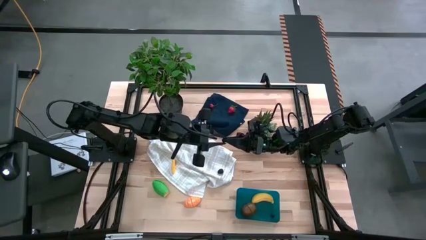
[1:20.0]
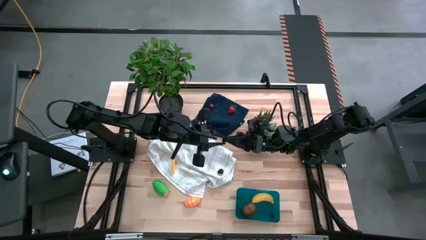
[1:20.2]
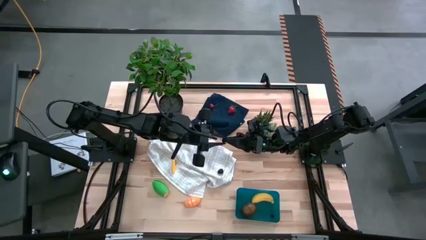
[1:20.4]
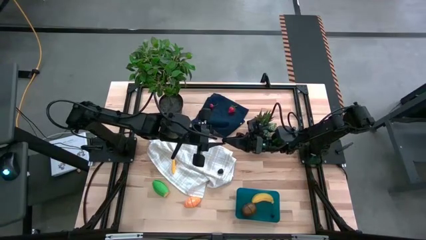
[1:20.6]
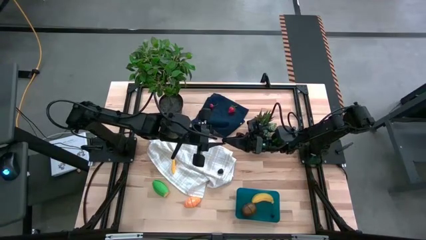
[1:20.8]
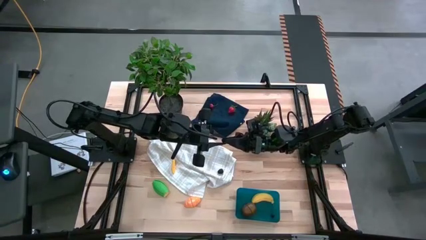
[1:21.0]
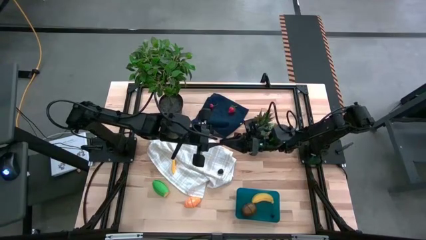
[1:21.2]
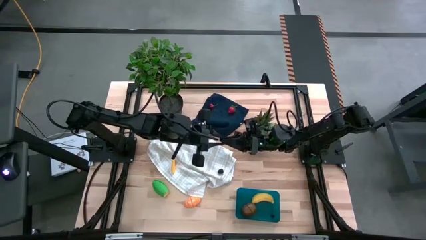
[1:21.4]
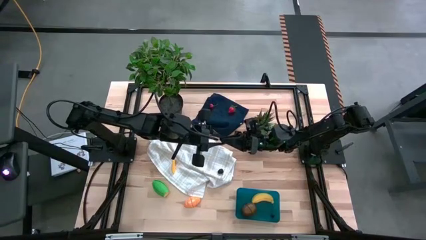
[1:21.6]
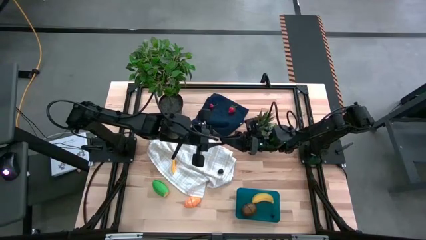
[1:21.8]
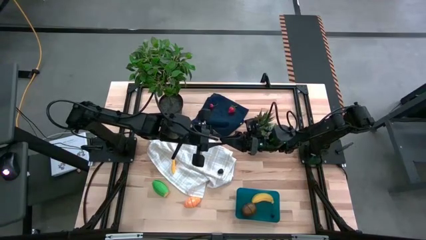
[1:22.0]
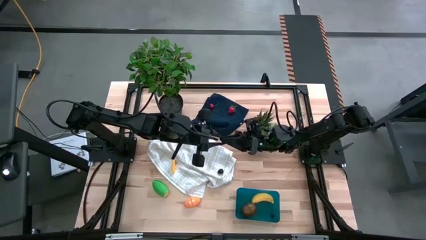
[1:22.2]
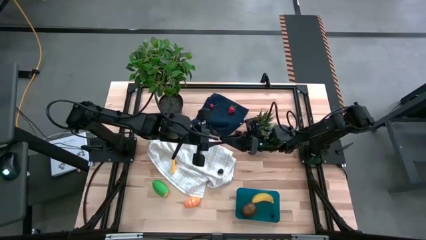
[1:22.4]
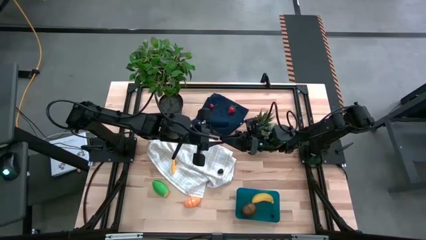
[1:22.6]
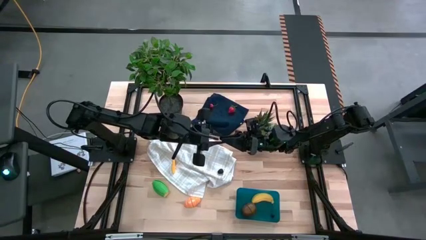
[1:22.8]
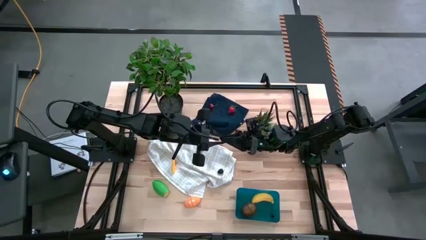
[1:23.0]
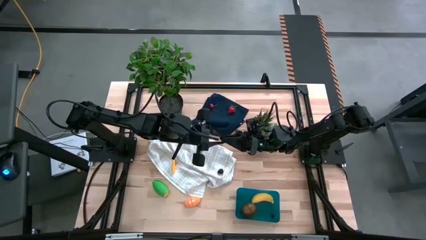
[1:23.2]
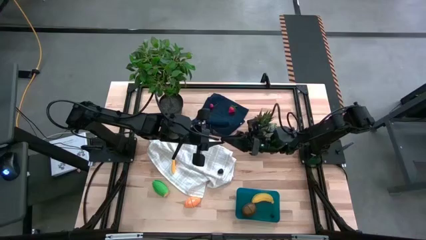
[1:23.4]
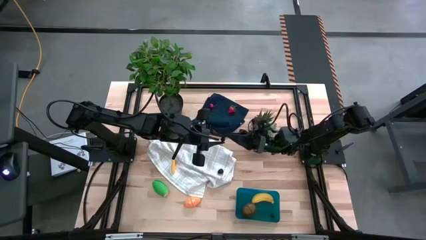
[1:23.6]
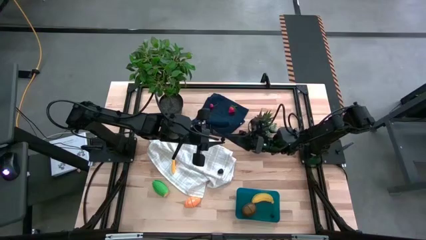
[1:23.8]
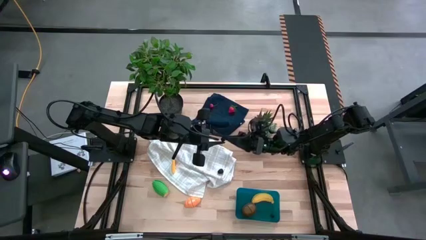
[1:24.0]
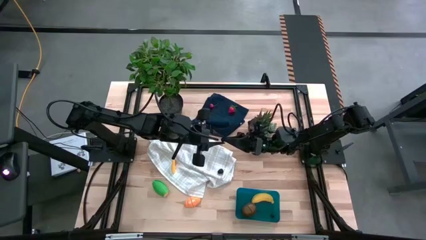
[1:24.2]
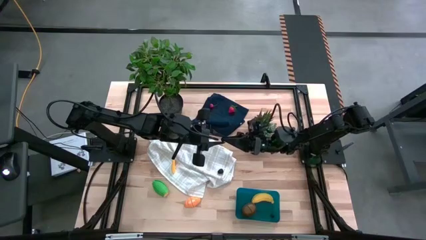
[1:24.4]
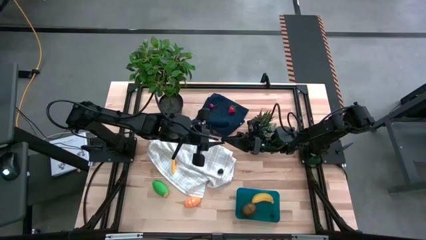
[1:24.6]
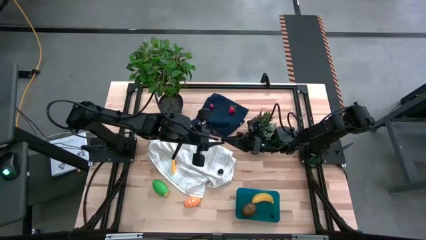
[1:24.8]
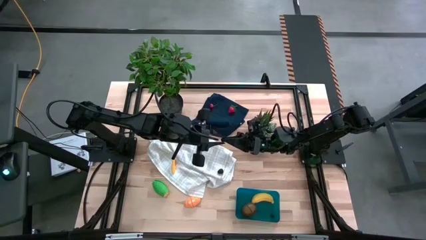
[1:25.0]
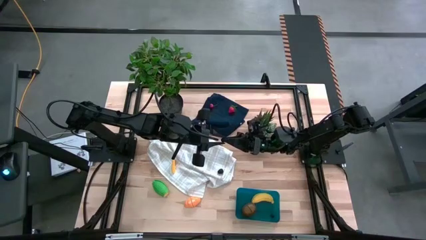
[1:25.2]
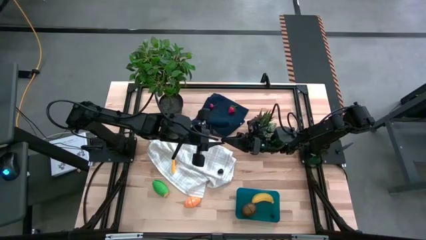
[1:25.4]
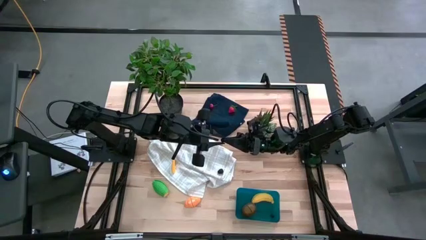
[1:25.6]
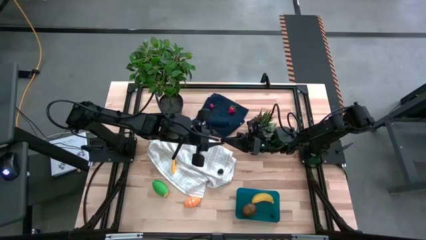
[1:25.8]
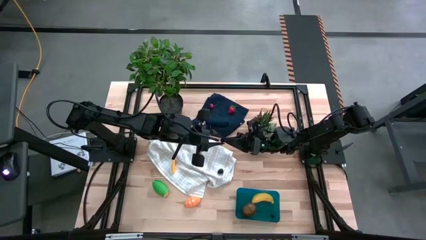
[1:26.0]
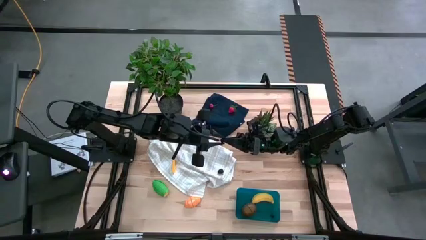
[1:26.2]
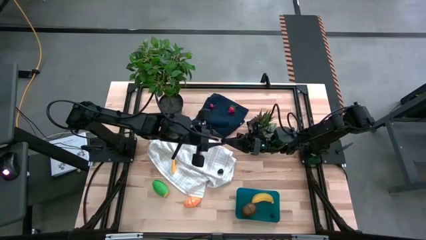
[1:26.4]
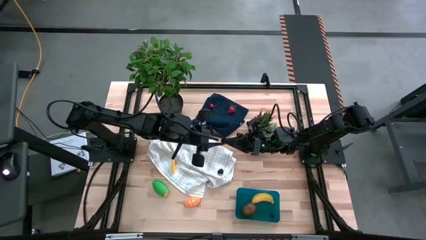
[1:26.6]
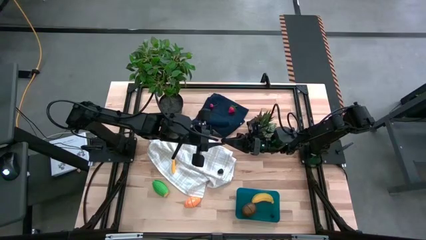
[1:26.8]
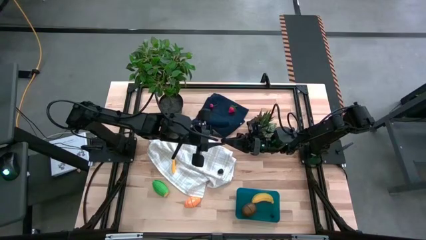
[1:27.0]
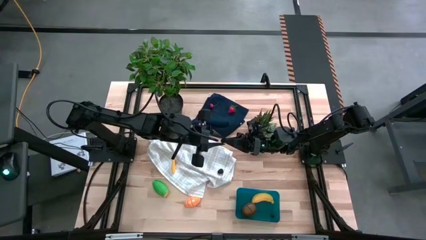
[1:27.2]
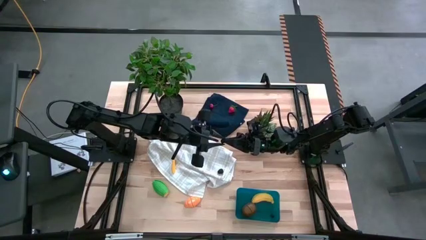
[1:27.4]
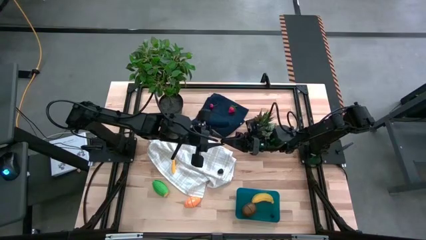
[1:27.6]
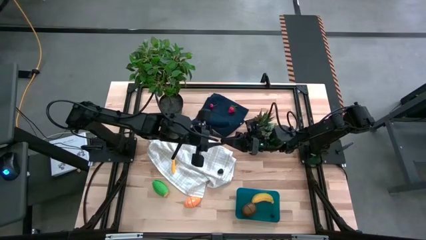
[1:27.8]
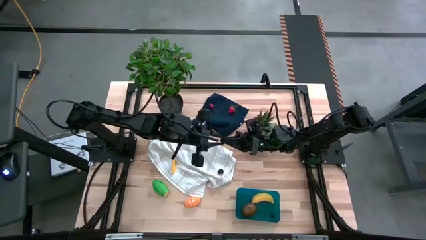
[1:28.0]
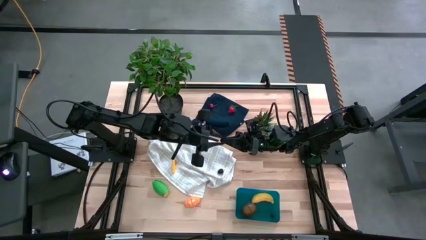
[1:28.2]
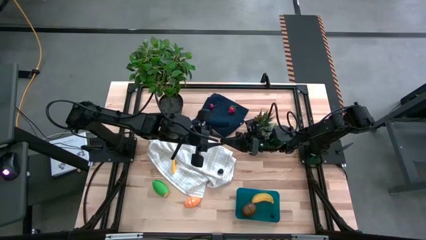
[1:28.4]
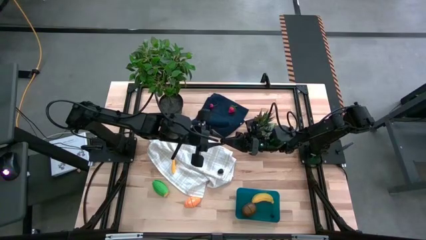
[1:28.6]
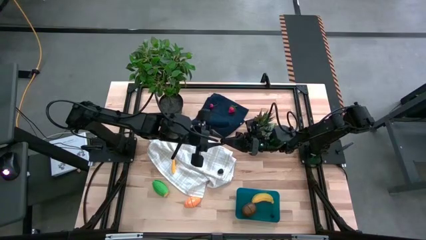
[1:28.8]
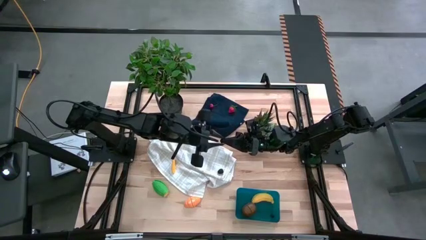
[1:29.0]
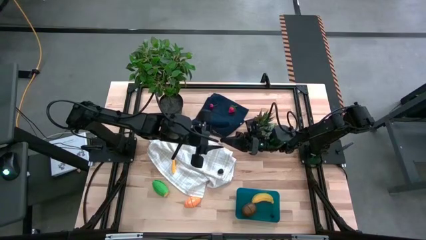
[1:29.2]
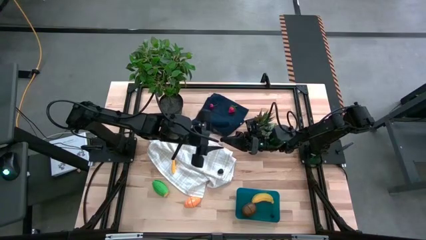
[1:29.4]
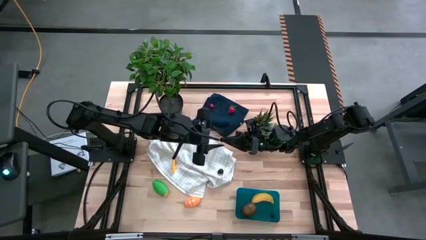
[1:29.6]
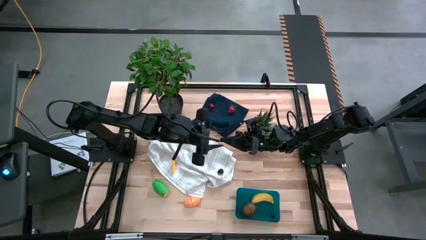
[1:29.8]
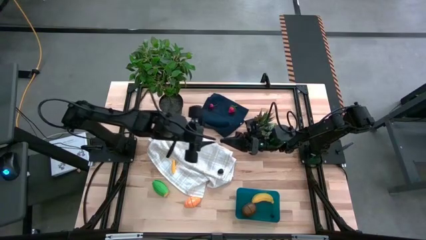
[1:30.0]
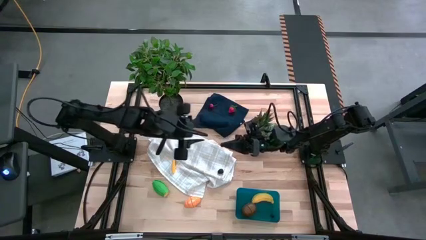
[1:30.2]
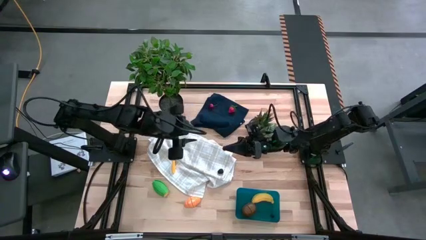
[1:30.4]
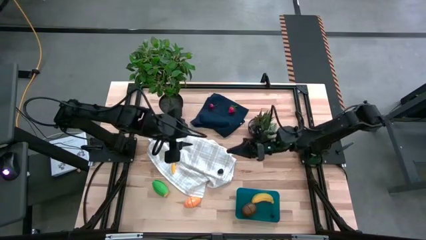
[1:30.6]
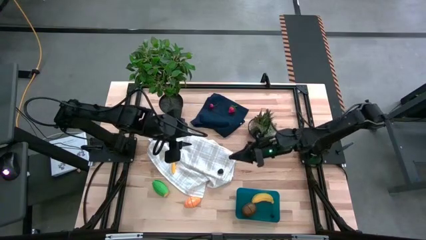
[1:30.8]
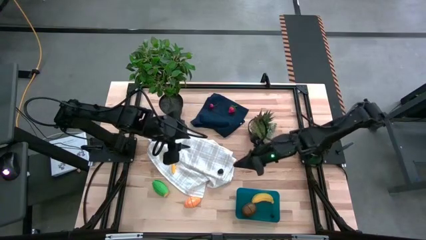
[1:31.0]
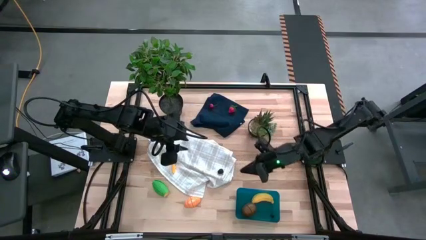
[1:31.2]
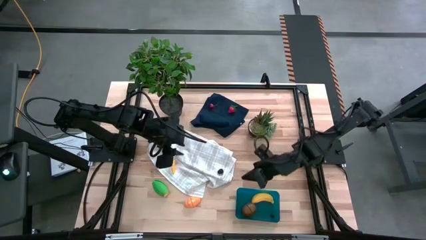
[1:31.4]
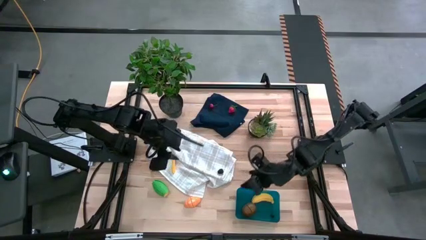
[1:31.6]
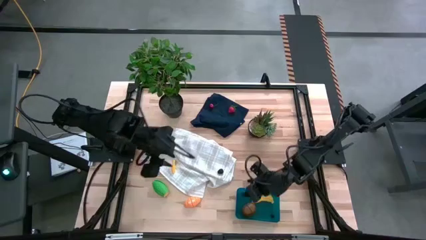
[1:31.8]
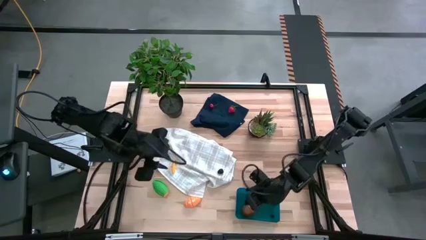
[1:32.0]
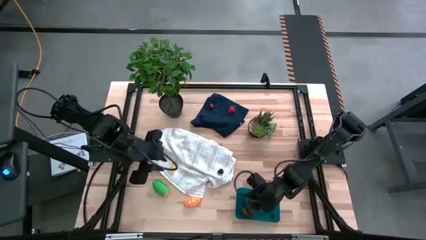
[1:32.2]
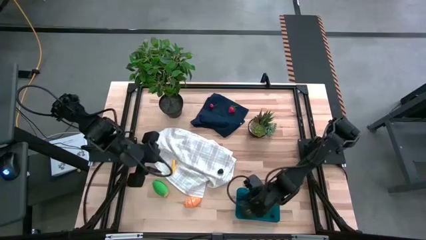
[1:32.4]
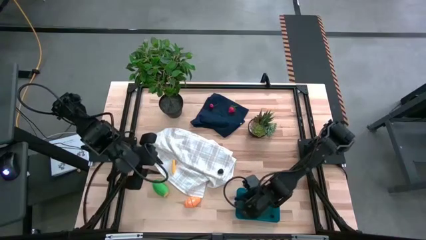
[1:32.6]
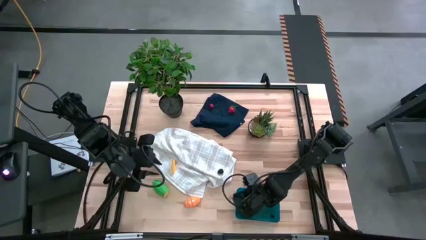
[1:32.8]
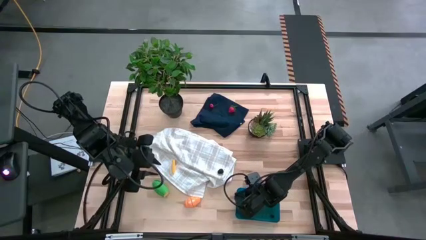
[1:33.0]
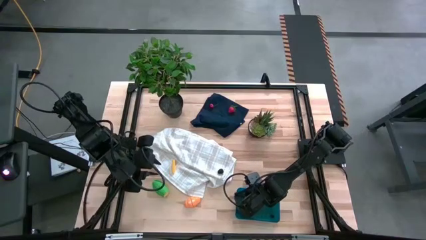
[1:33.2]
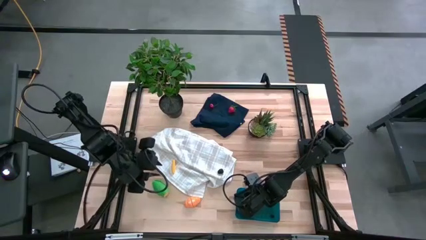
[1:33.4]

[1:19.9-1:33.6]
Task: Pick and placing Produce into tupperware
Put the blueberry into the bin

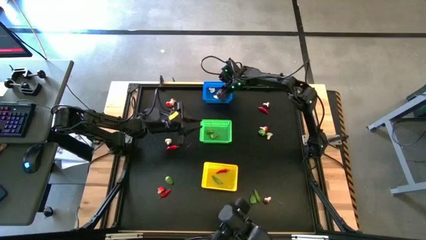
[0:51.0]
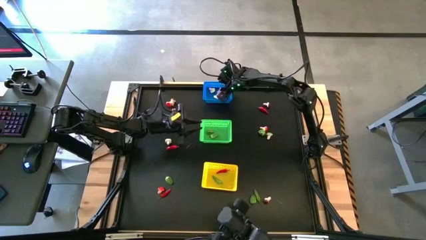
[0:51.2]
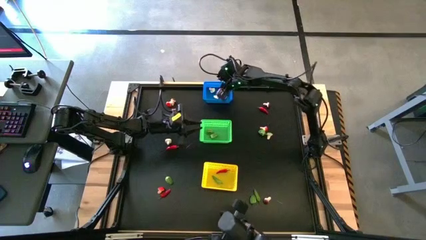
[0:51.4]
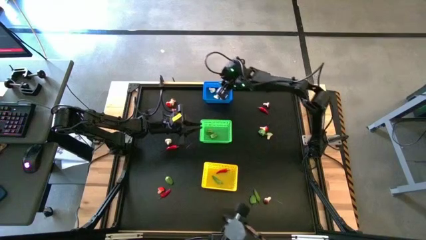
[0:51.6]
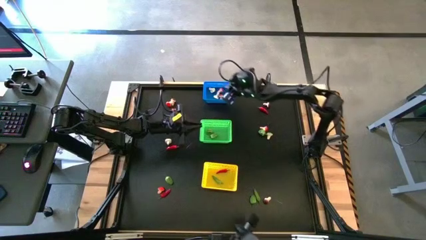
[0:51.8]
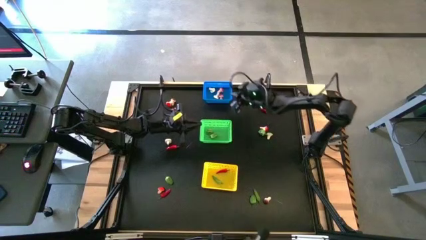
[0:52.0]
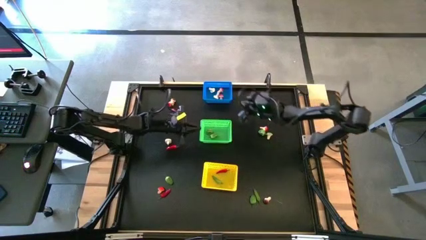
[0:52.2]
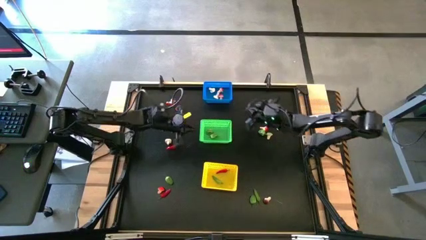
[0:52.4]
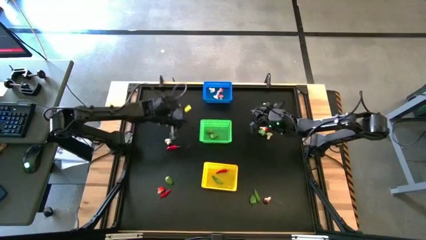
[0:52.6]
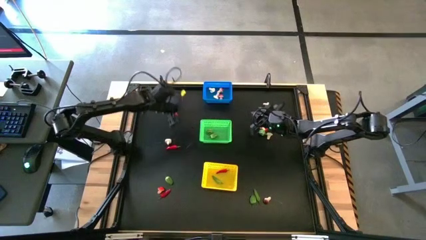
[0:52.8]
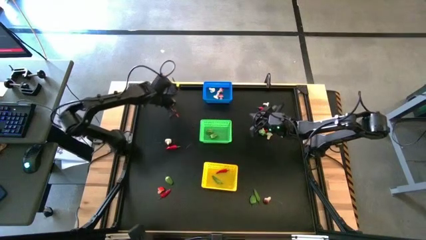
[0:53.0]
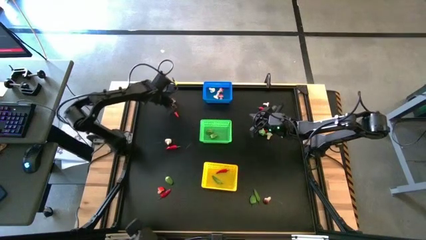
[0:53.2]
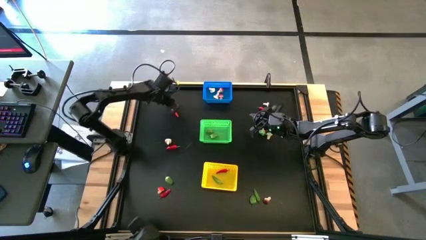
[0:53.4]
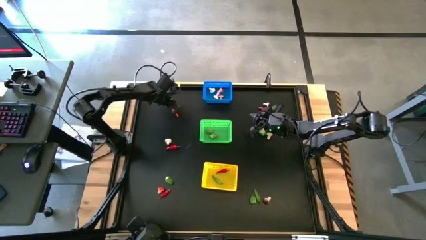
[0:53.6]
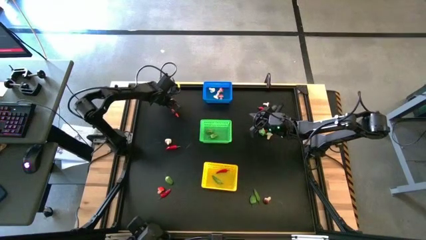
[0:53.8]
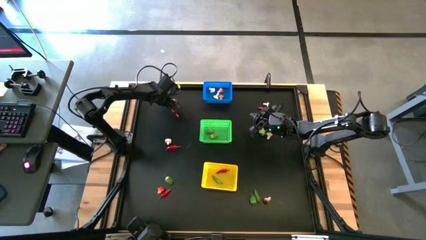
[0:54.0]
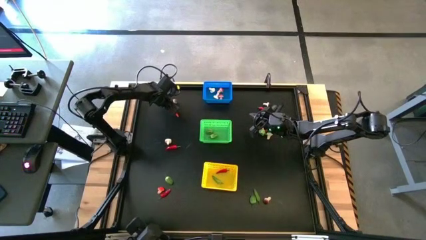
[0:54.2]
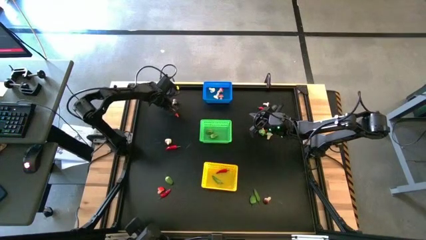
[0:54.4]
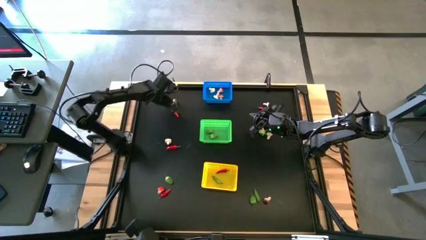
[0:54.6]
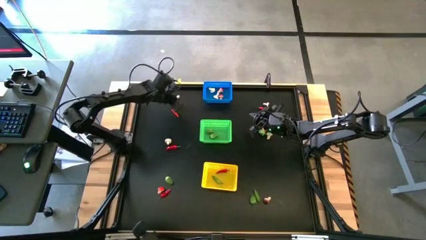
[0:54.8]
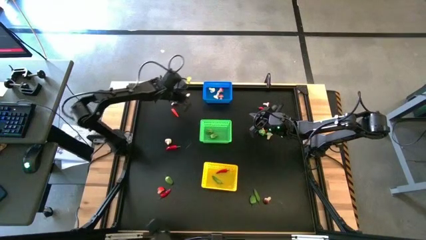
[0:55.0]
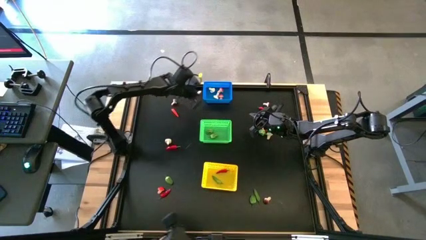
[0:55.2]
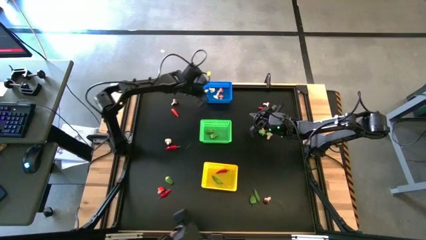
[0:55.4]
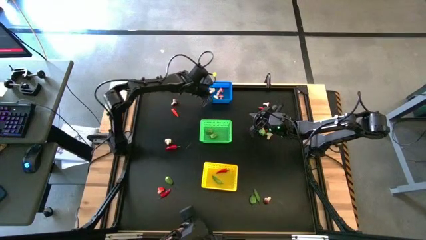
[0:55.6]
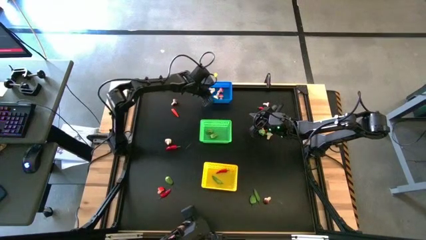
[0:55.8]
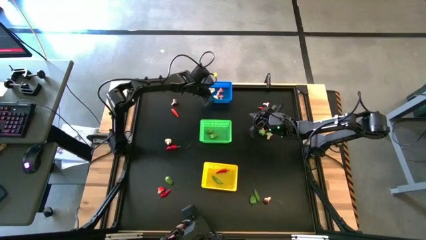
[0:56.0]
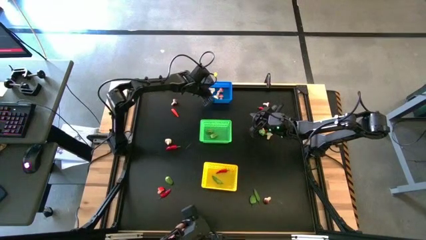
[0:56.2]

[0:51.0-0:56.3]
Task: Sort produce into baskets
Put the red mushroom into the blue bin
